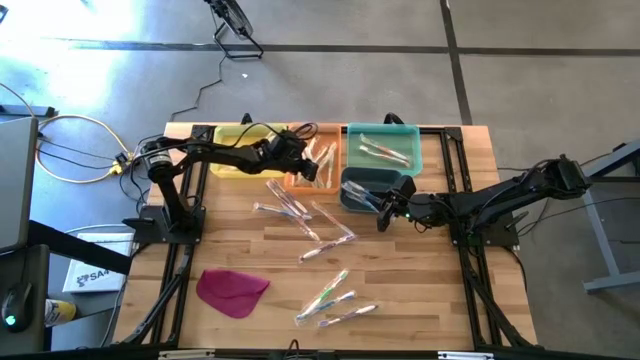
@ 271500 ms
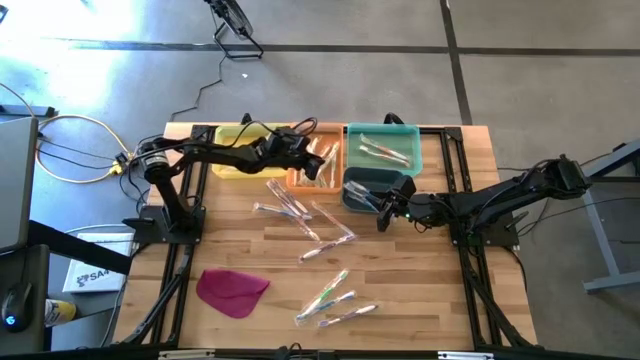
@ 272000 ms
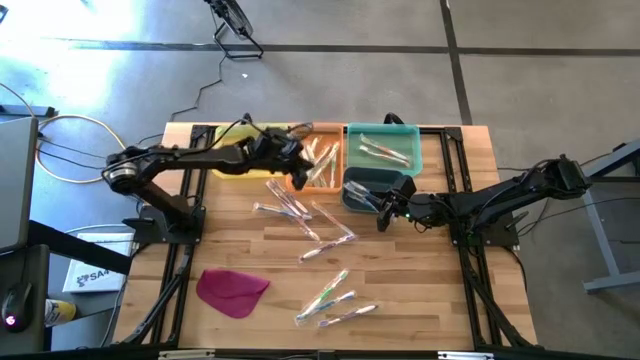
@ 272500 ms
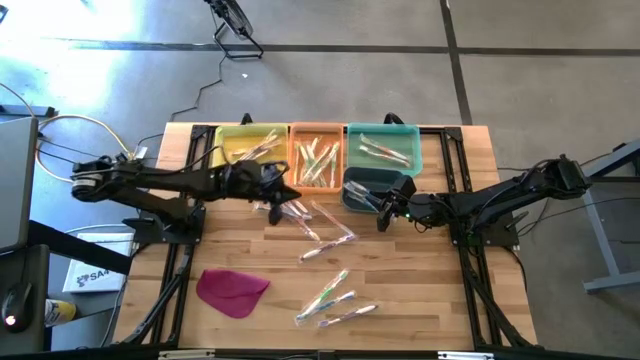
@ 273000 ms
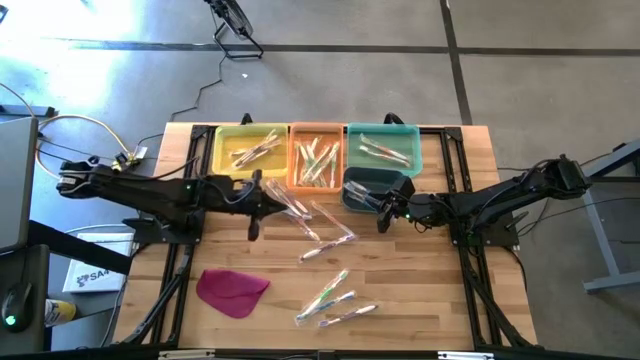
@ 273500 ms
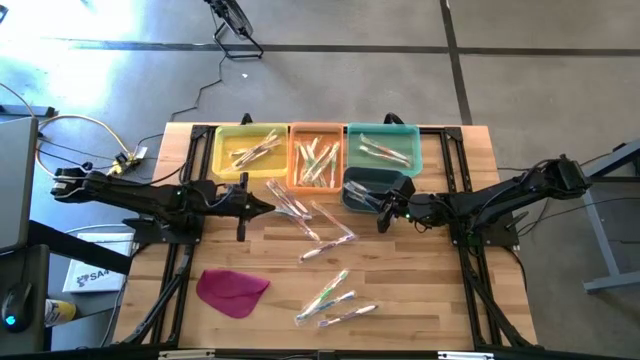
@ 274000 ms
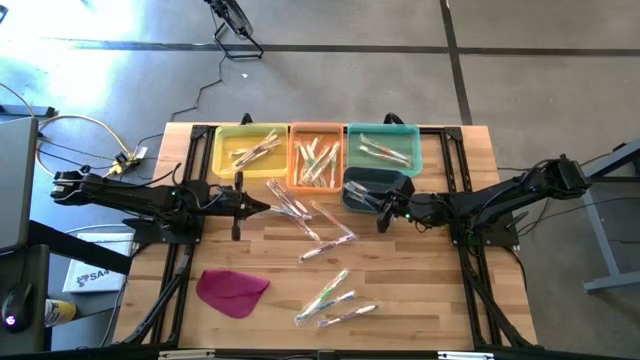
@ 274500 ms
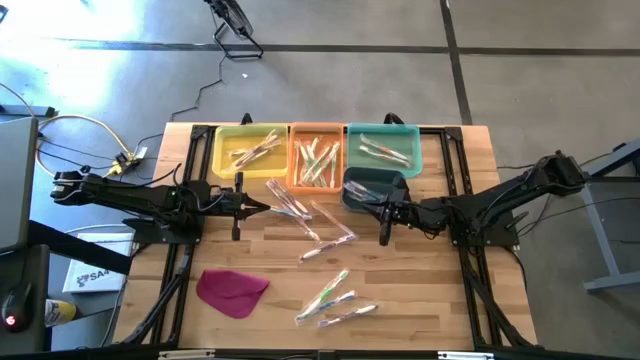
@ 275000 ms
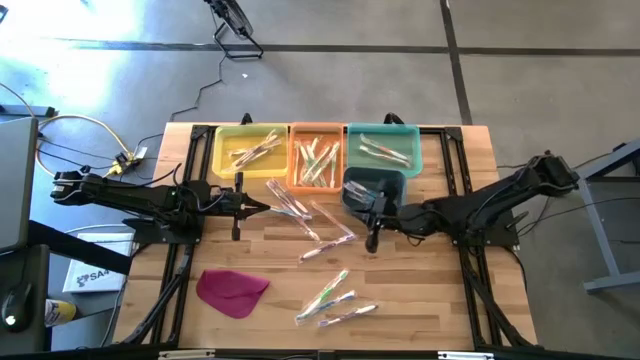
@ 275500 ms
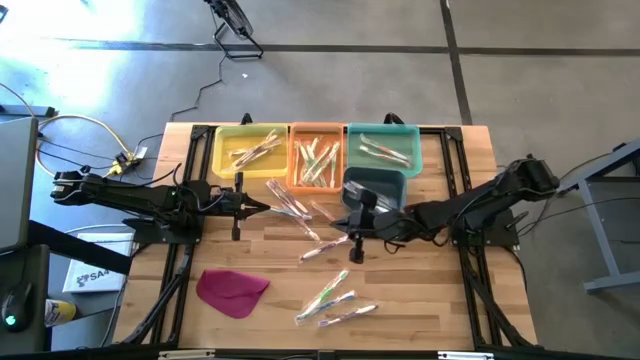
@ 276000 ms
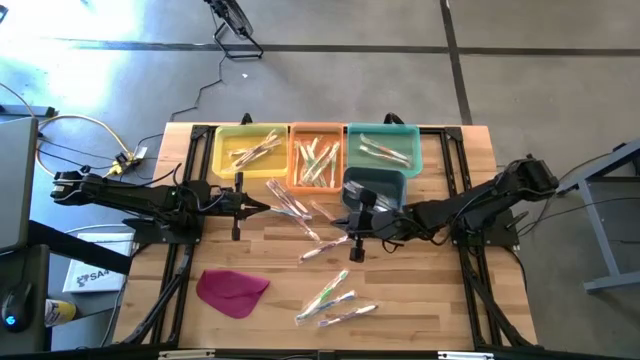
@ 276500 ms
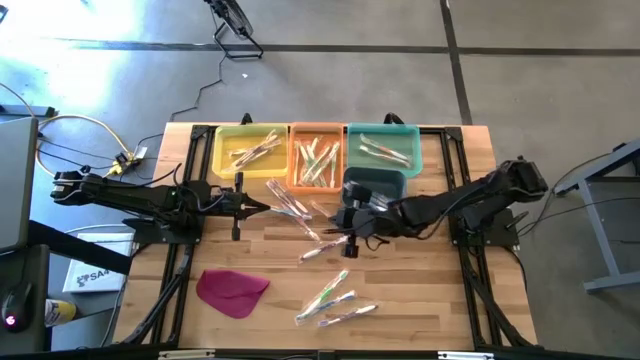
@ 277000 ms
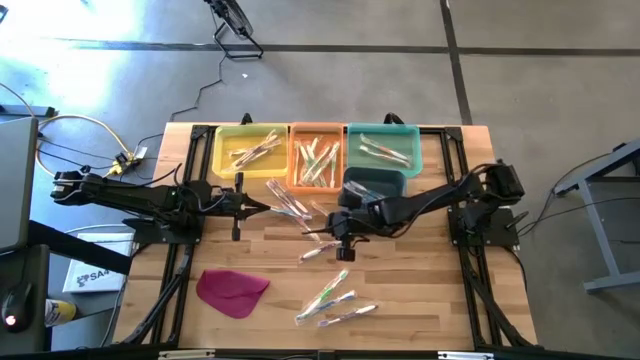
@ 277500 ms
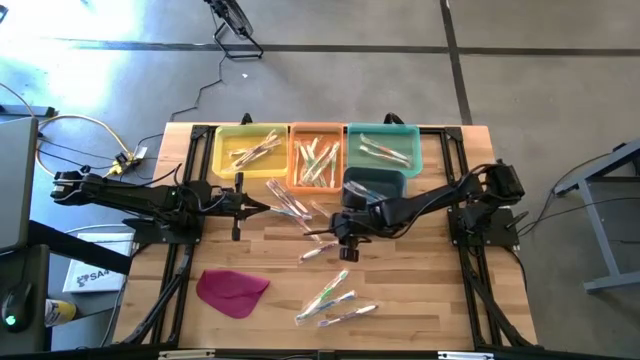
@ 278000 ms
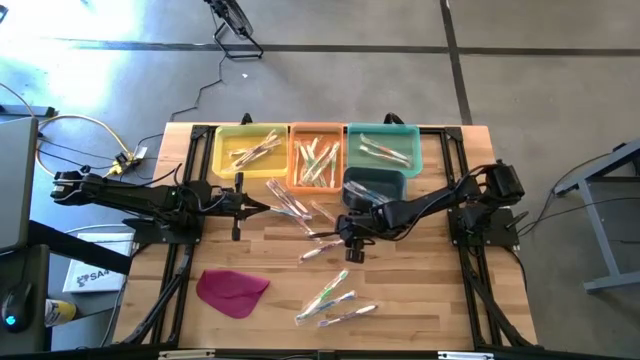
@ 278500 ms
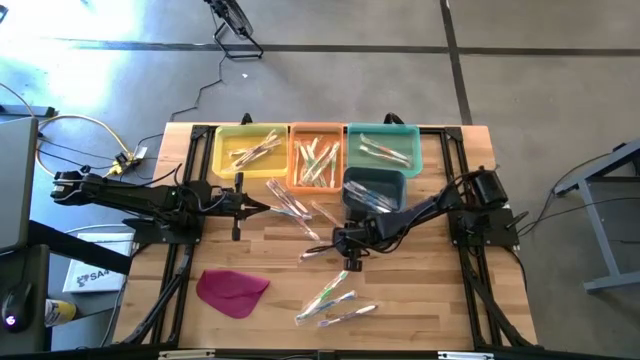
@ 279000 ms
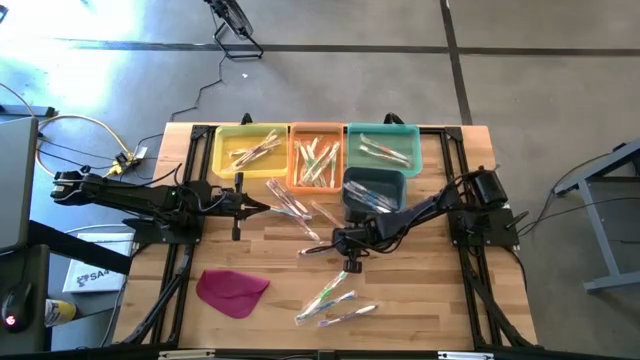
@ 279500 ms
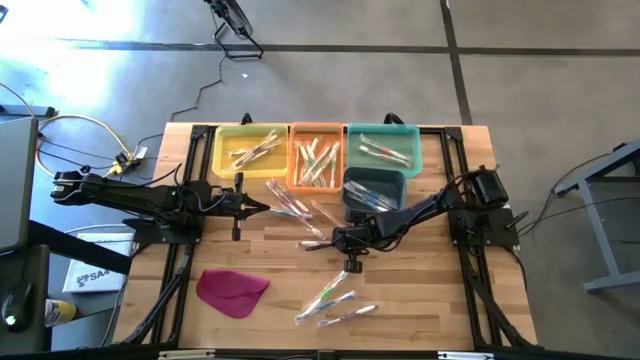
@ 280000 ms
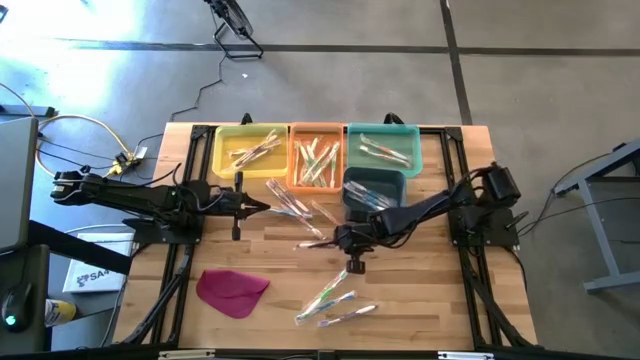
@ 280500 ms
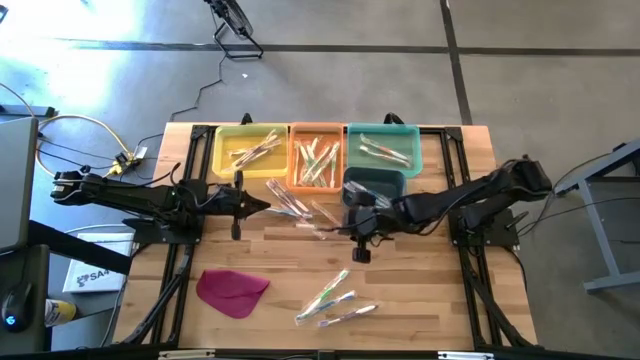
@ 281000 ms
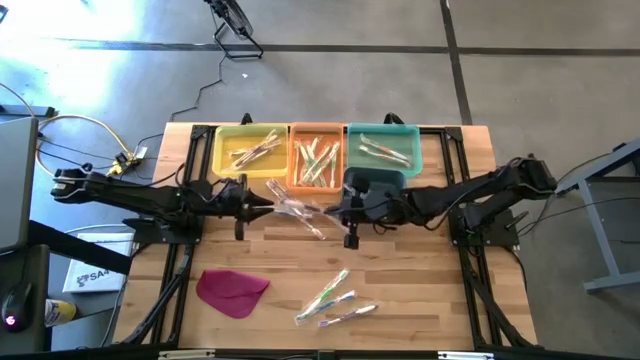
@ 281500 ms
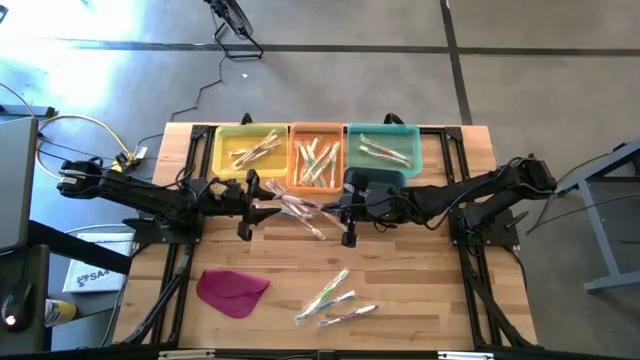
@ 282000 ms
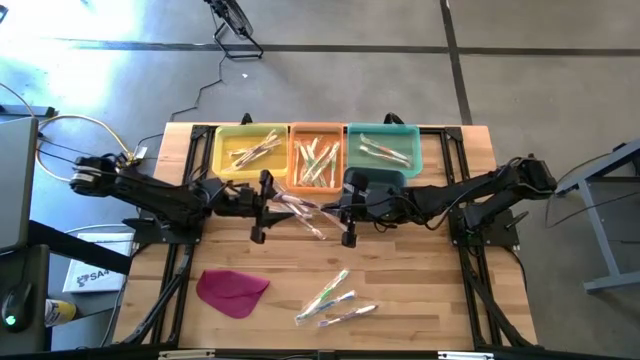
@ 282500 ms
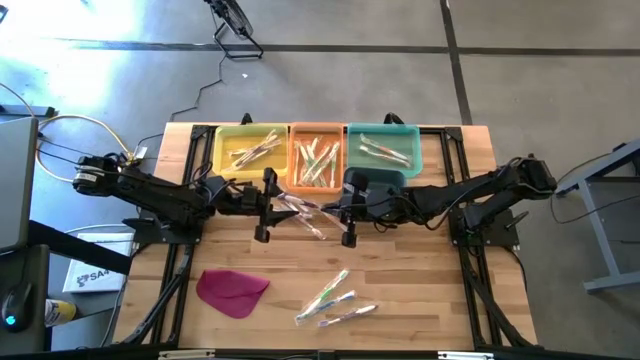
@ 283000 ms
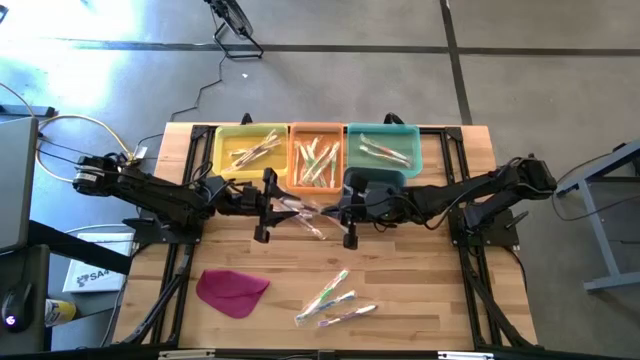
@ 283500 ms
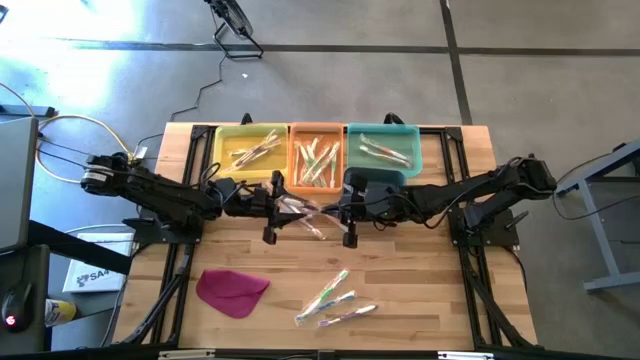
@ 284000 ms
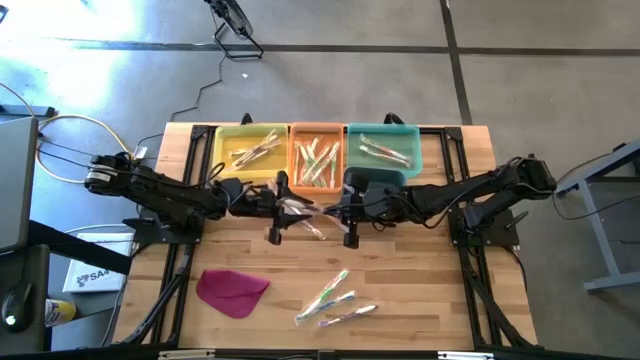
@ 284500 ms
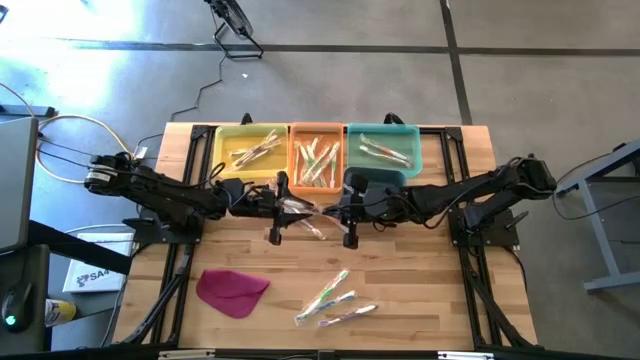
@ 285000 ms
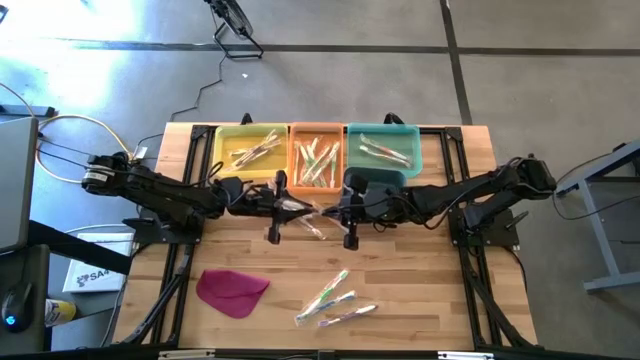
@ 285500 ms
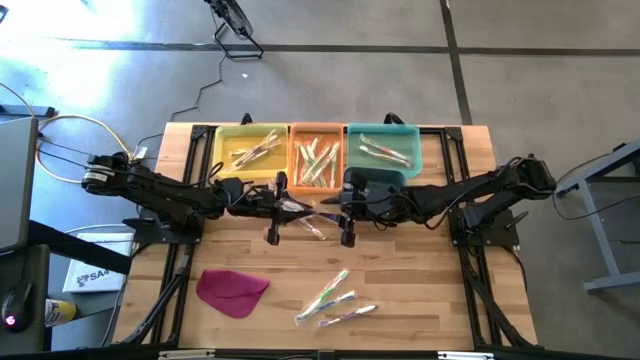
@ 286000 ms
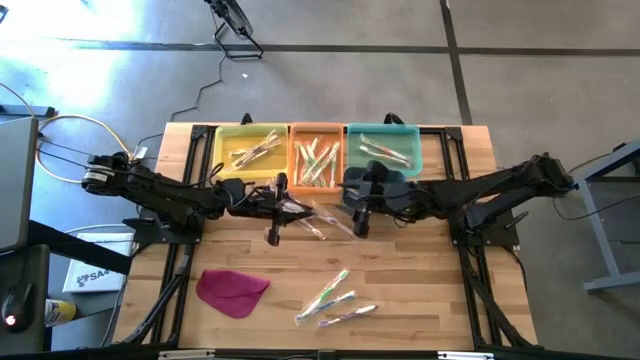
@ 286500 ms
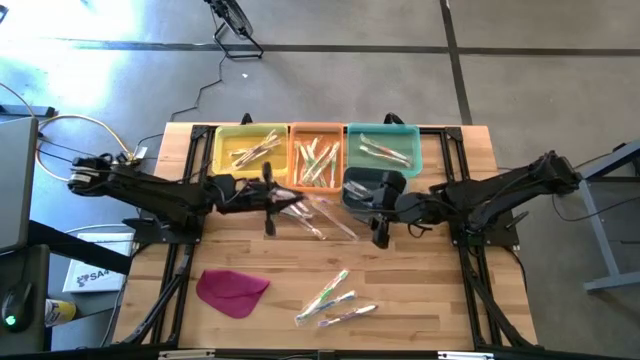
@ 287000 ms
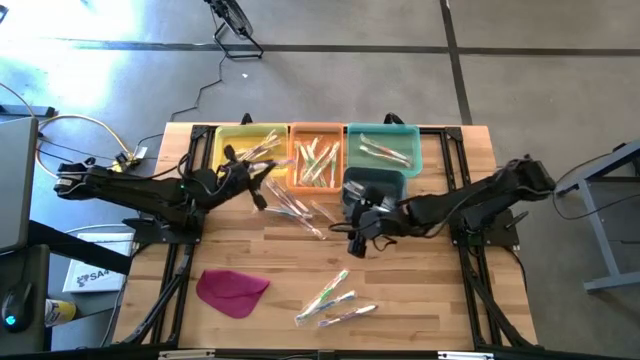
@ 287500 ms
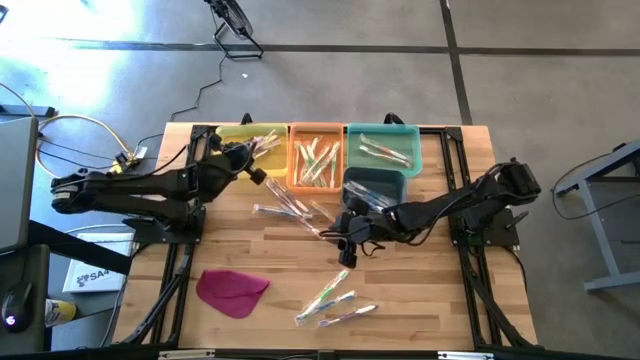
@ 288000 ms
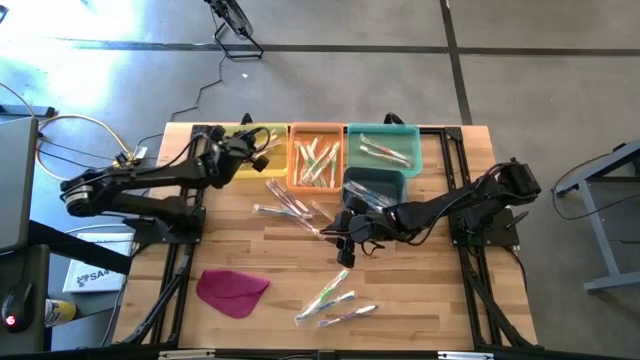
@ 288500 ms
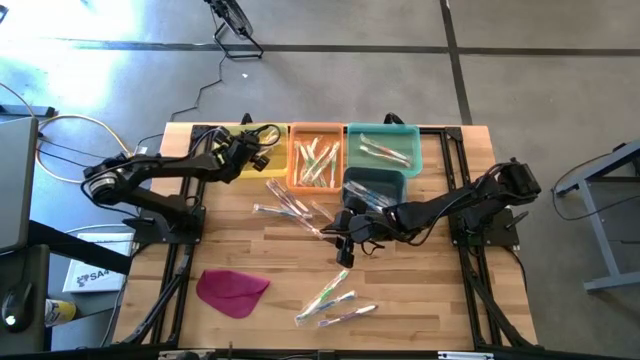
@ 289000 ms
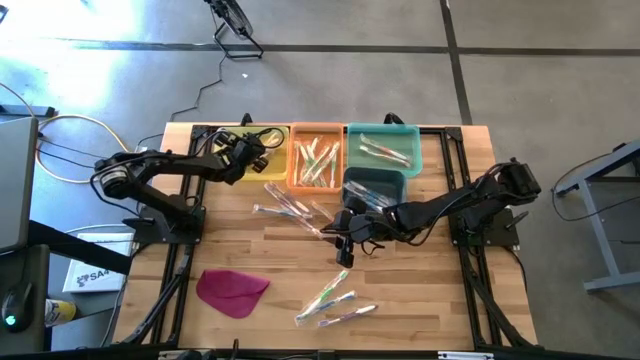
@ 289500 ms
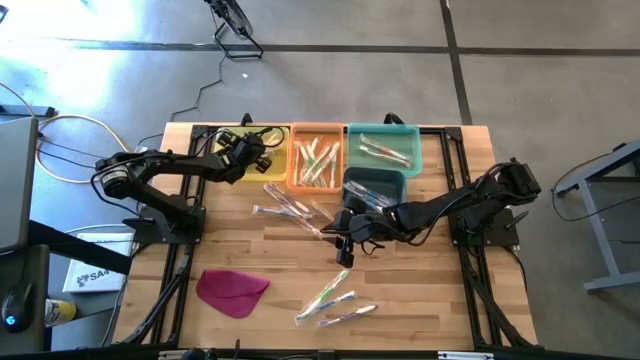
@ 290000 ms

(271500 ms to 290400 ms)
Task: Pick & Place Toothbrushes
Put the violet toothbrush into the yellow bin

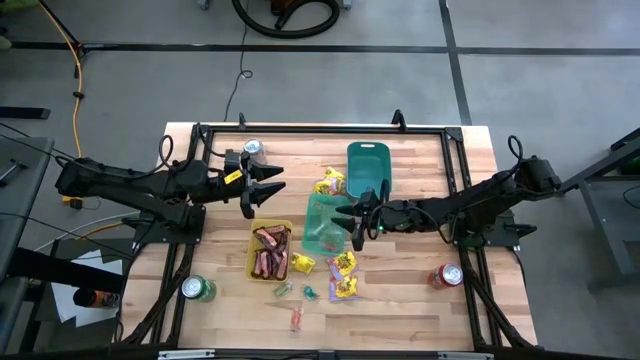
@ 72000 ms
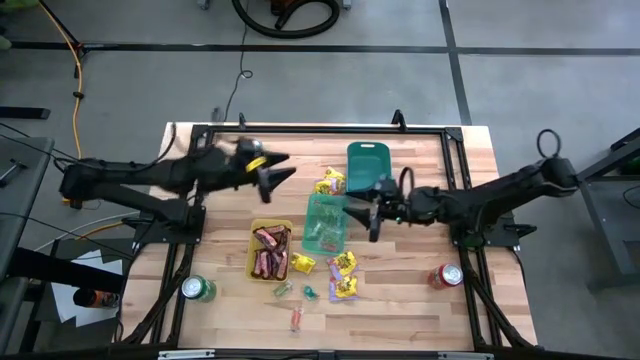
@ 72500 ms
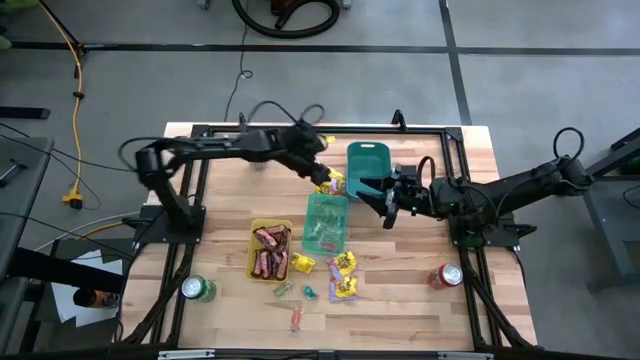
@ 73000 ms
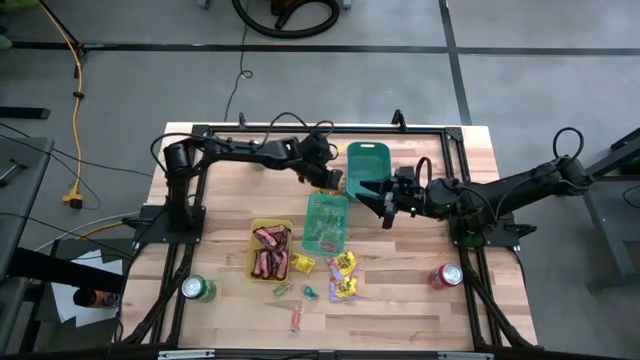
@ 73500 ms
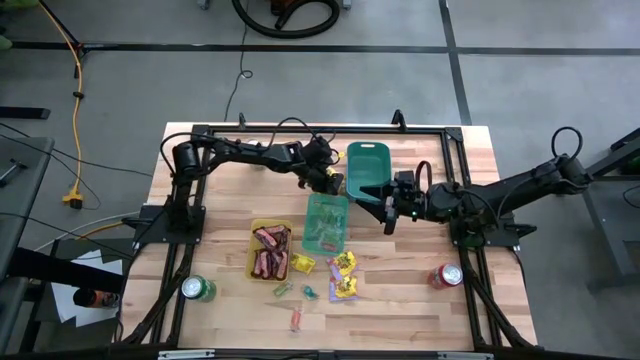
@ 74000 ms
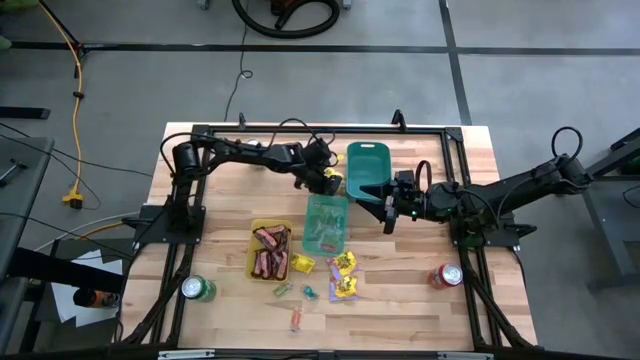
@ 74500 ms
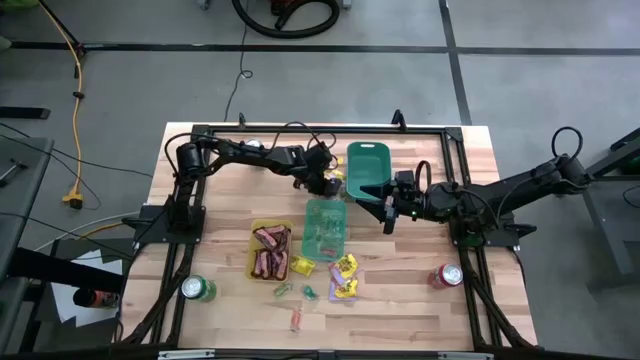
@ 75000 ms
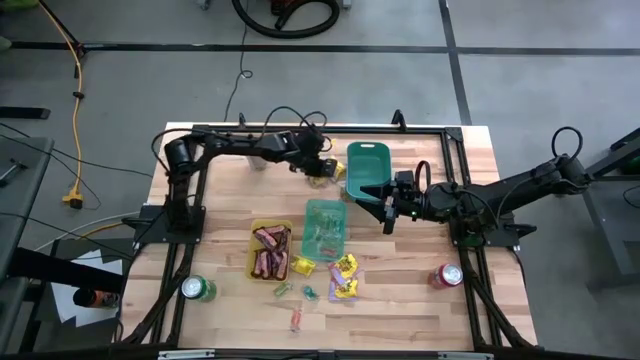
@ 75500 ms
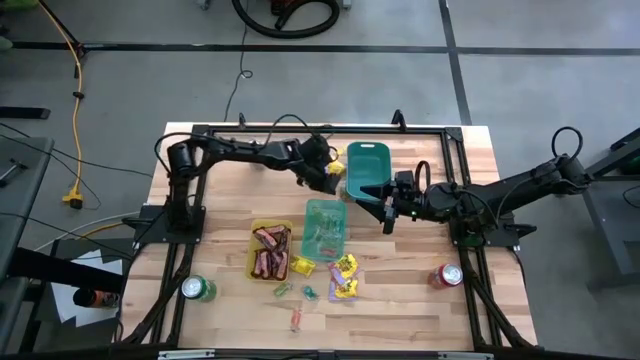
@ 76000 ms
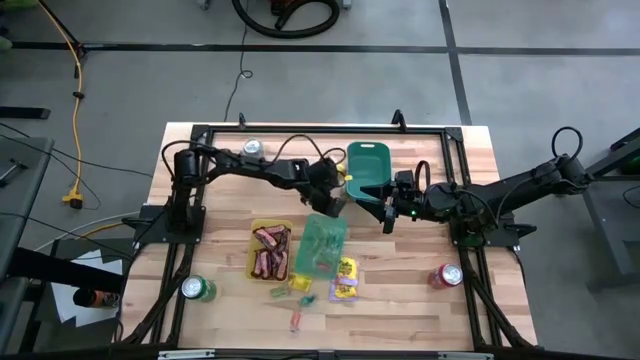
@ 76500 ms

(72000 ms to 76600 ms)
Task: Sort candy
Adjust the light blue bin to the center on the table
